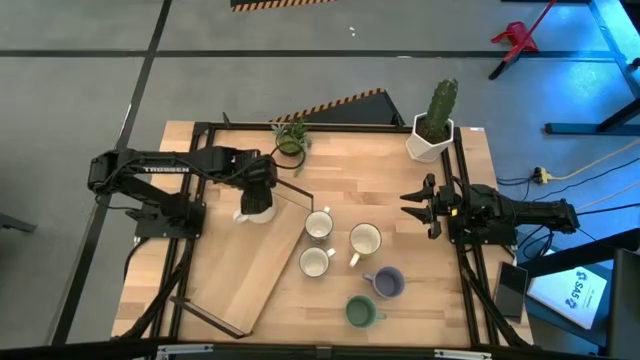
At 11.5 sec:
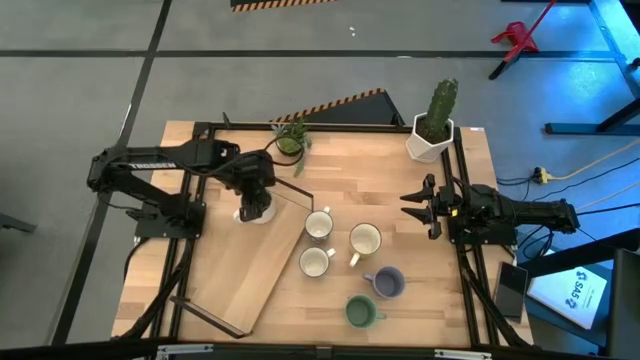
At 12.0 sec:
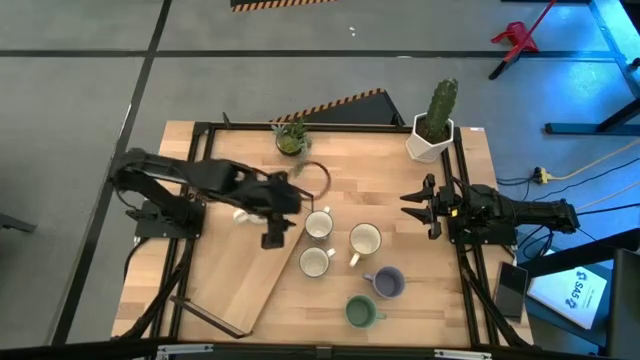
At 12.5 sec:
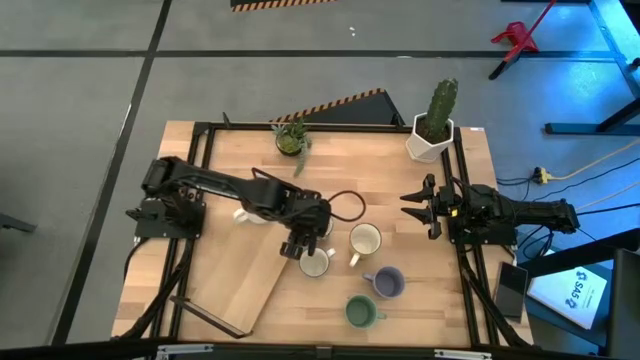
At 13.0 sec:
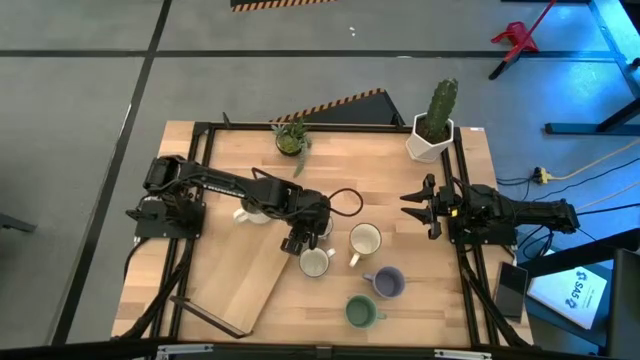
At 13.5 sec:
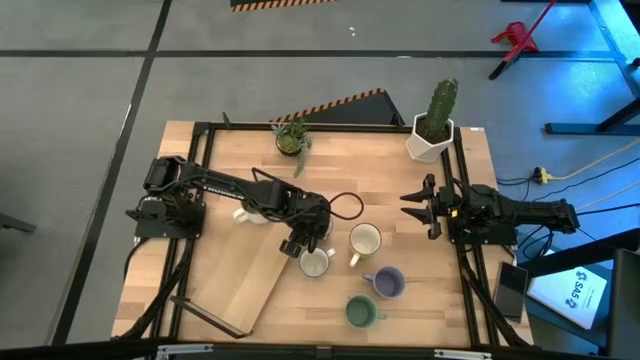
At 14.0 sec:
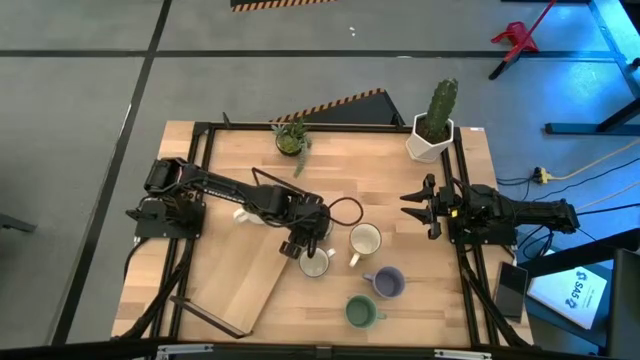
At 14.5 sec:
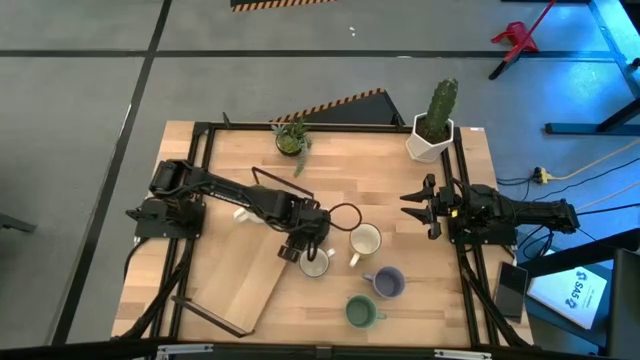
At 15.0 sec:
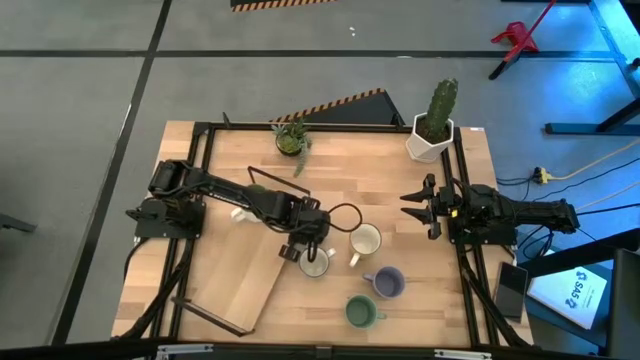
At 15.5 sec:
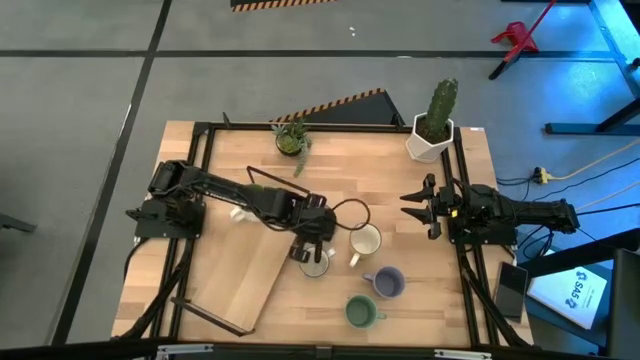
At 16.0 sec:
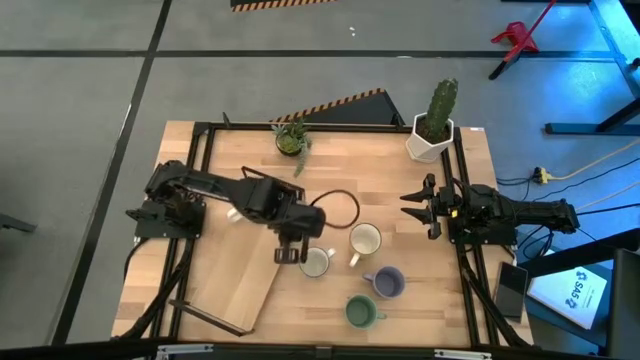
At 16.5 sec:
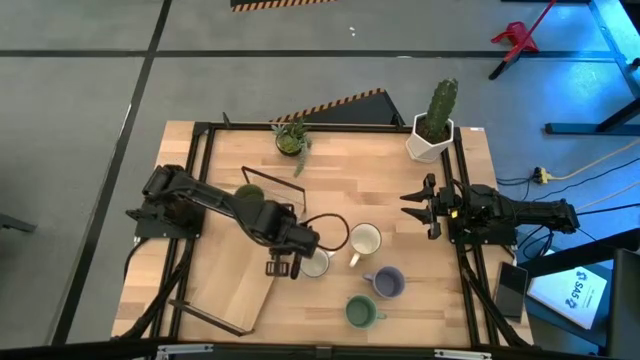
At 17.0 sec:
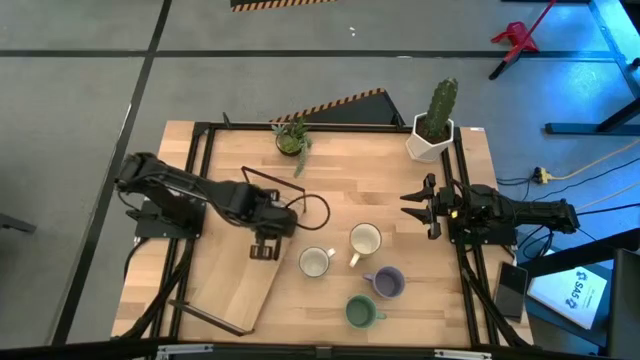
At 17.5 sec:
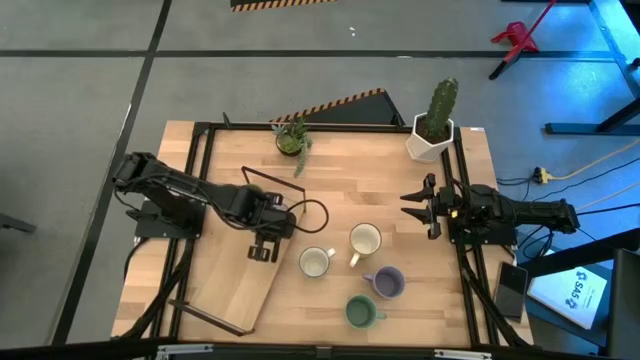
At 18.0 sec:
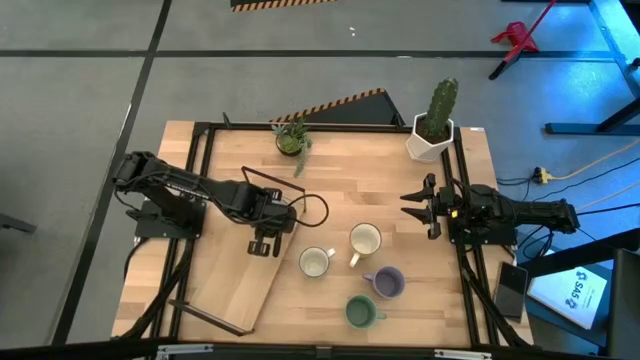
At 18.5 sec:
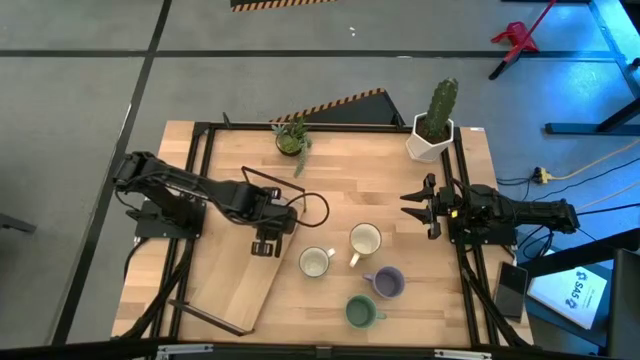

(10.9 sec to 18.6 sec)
Task: Place coffee mugs
Put the top blue patterned mug on the shelf

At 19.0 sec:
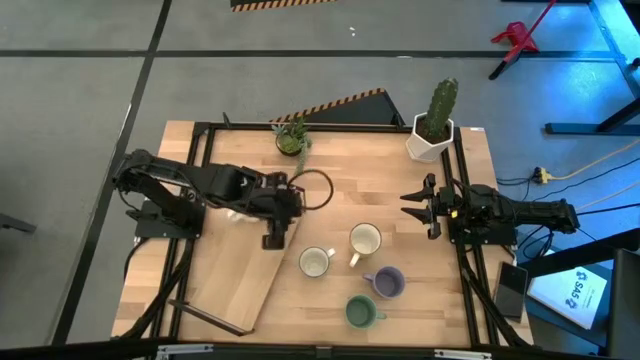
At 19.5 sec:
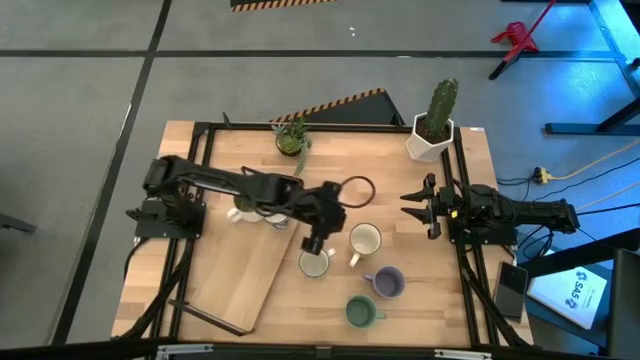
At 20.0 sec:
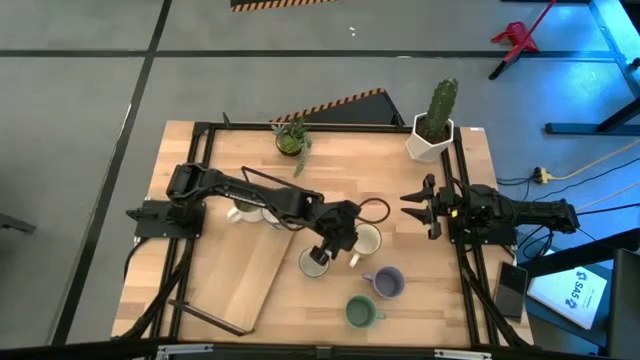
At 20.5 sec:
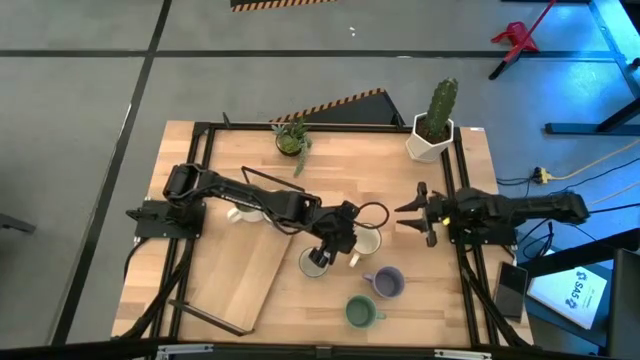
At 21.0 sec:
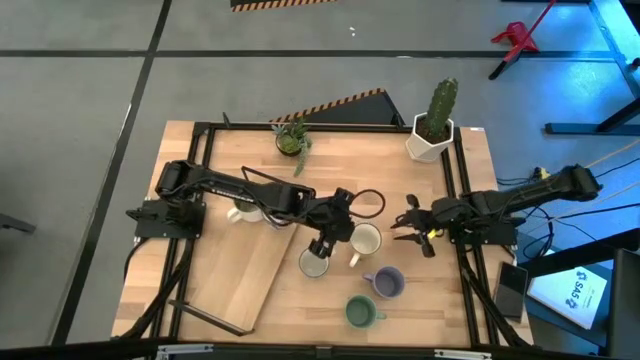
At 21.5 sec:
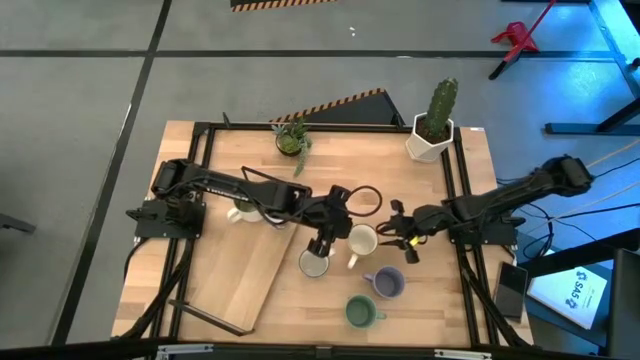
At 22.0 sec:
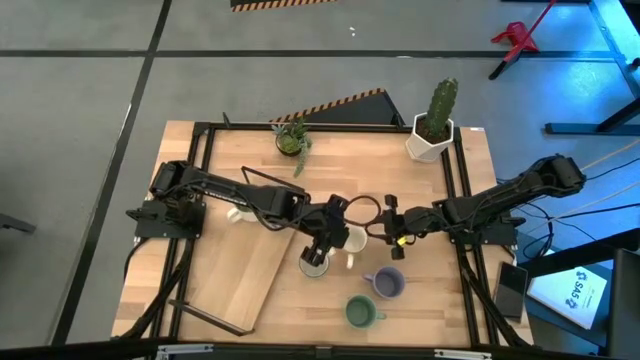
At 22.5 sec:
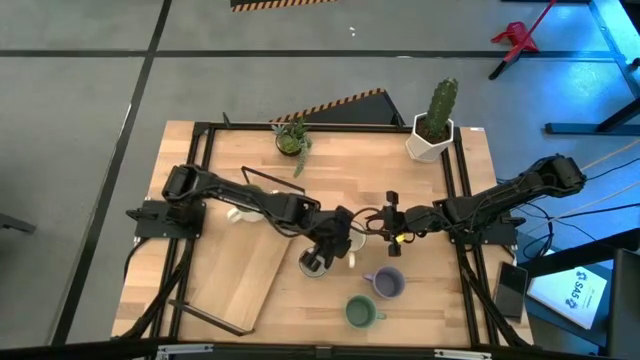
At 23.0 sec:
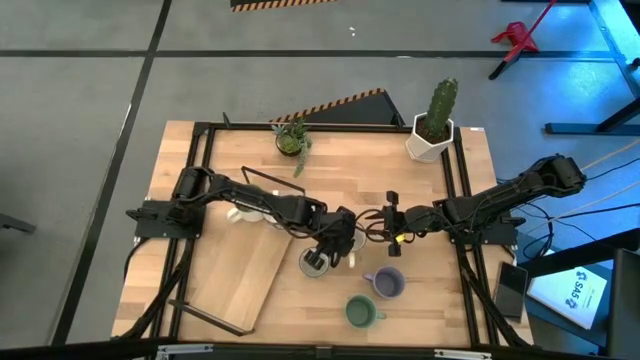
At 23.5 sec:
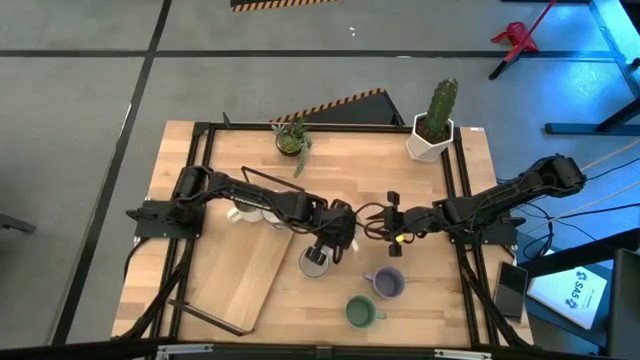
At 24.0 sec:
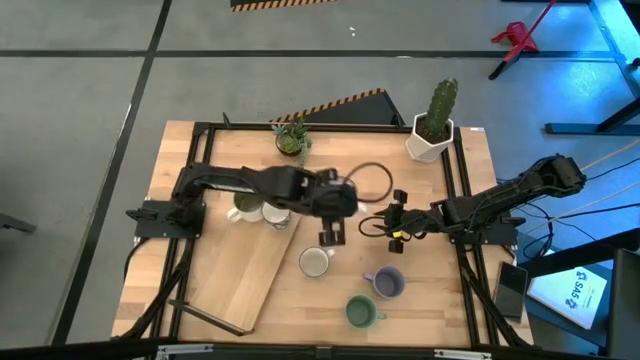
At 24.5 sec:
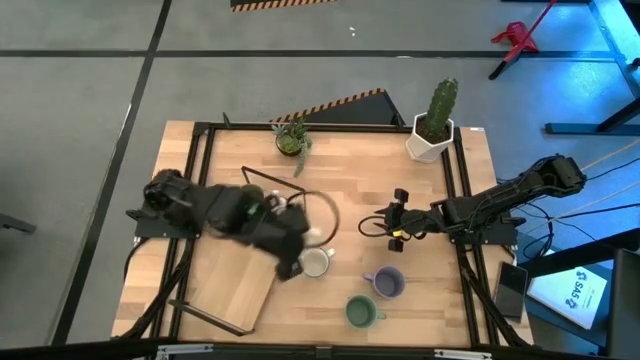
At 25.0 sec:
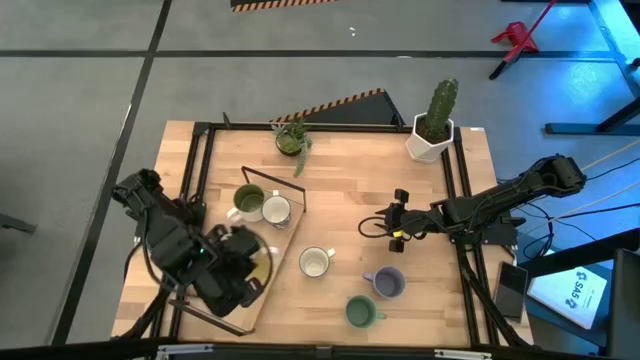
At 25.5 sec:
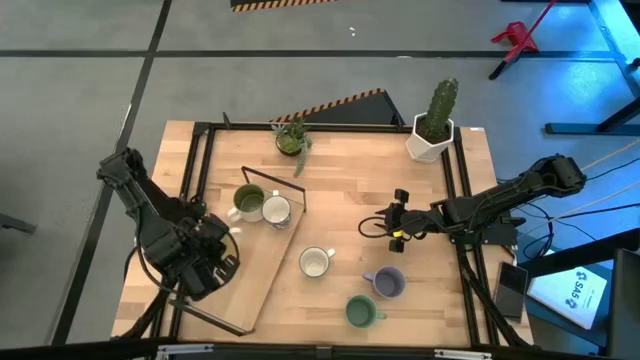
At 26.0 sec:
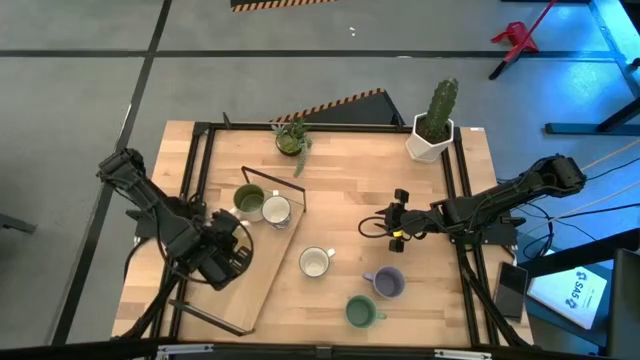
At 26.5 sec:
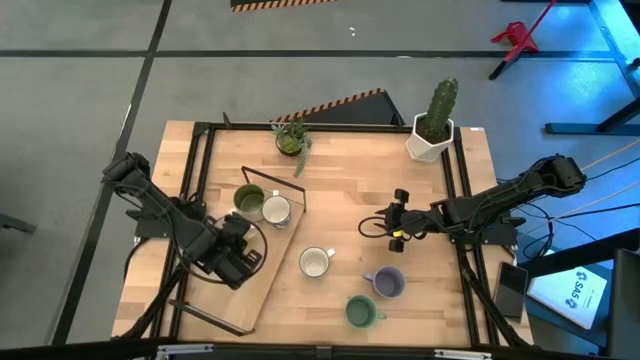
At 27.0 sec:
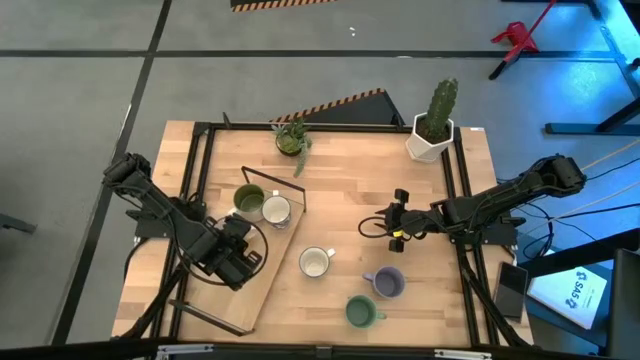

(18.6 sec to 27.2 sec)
Put the yellow and white mug on the shelf

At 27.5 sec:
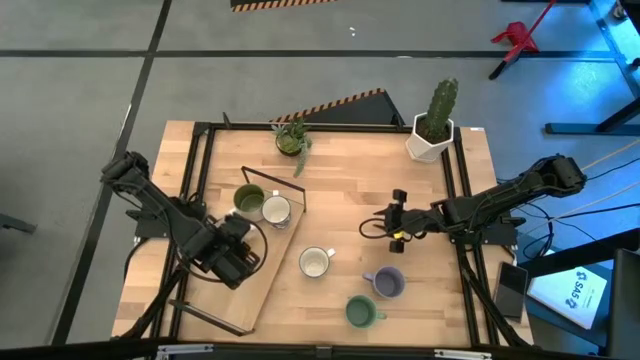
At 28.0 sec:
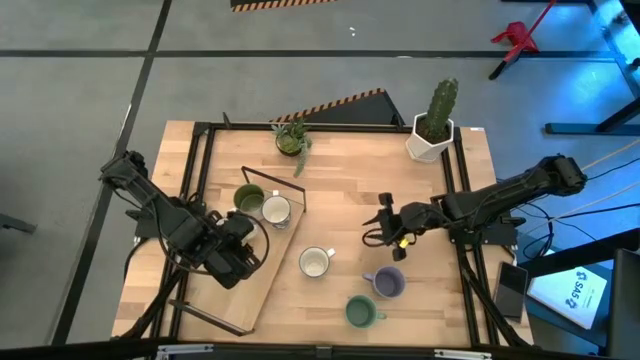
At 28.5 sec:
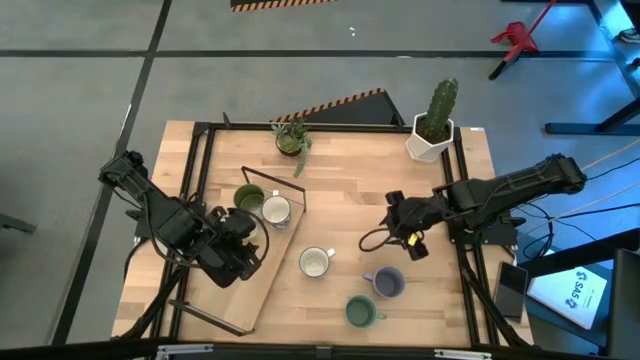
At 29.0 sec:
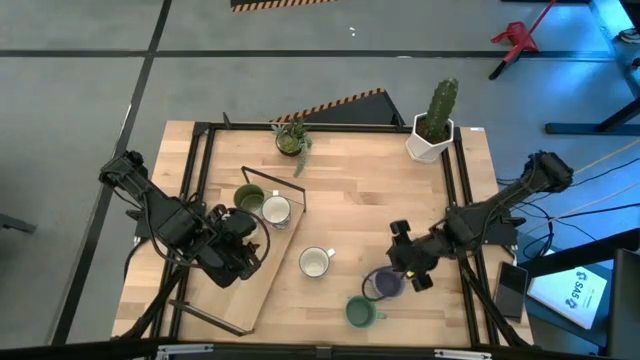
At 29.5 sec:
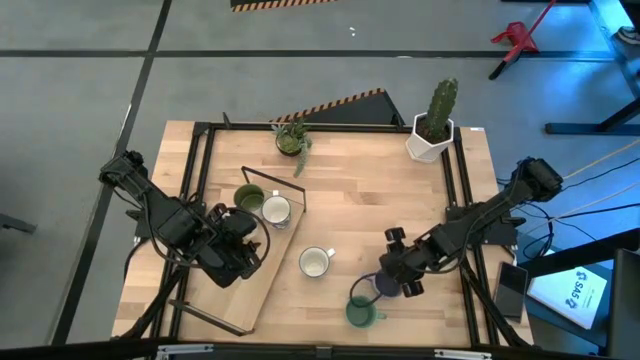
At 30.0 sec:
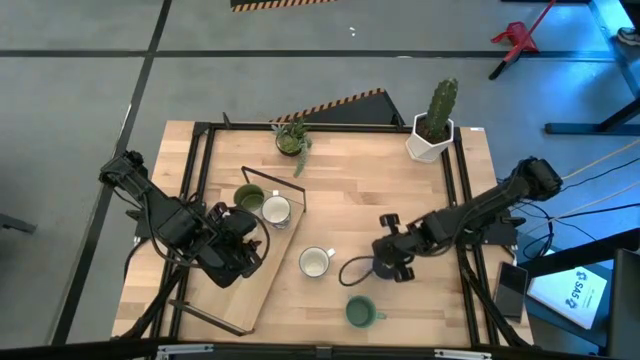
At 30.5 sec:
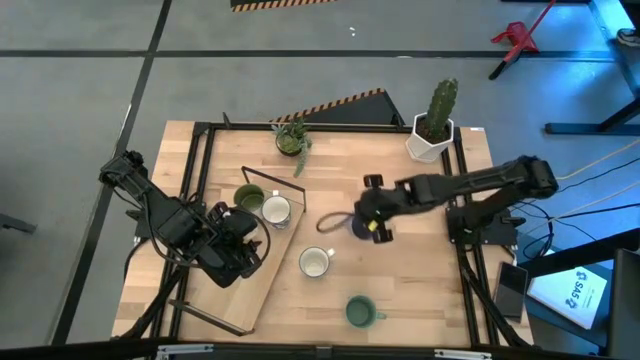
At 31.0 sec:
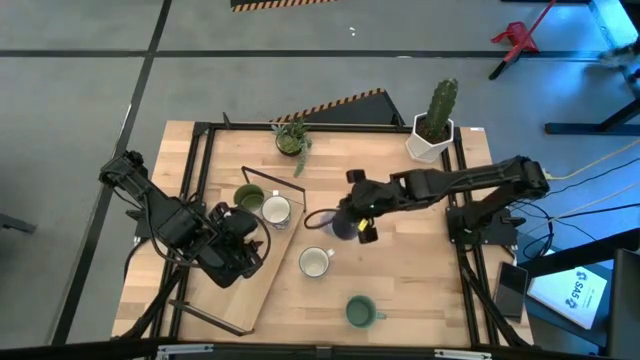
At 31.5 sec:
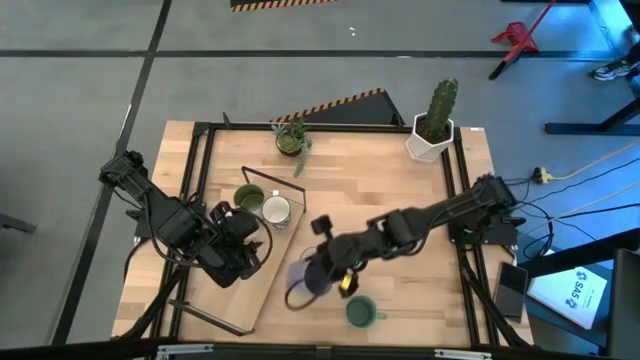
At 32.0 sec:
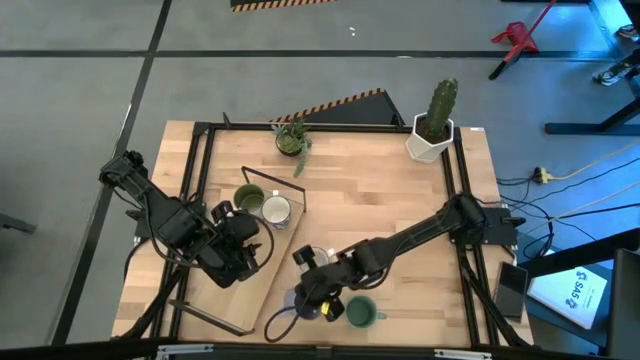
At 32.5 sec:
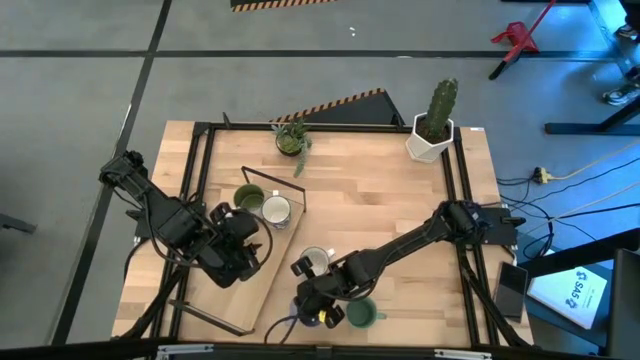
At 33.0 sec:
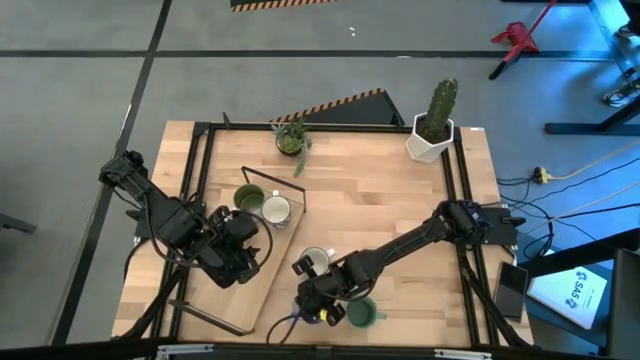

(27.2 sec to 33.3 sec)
Move the purple mug to the bottom center of the table
